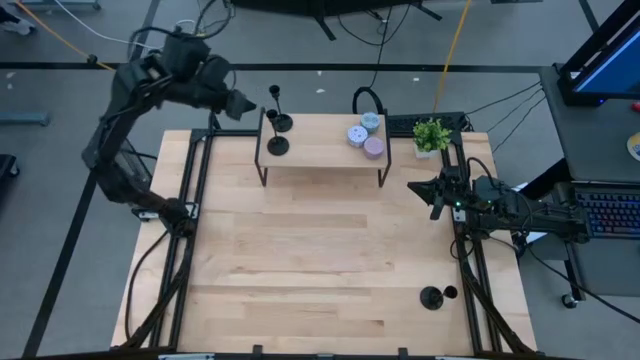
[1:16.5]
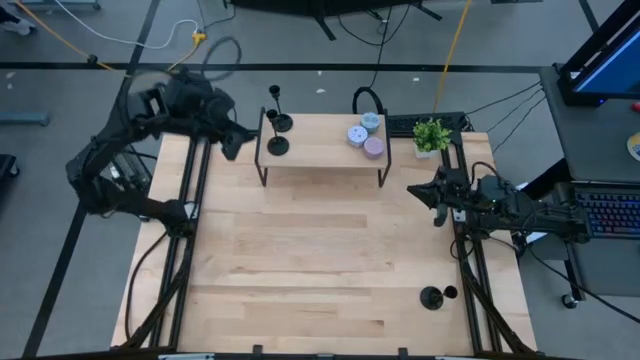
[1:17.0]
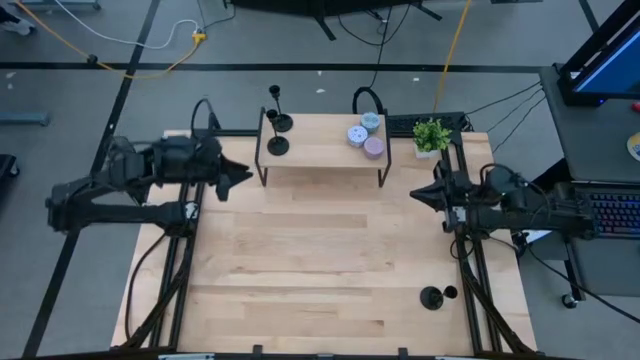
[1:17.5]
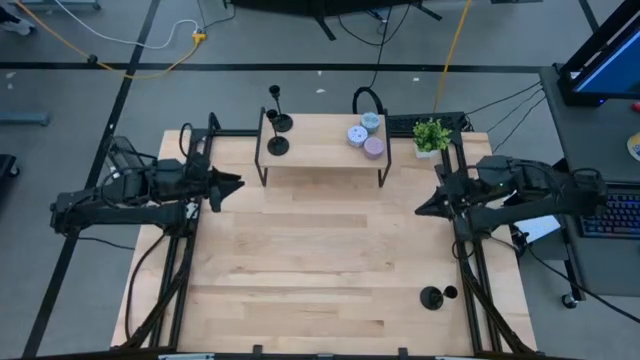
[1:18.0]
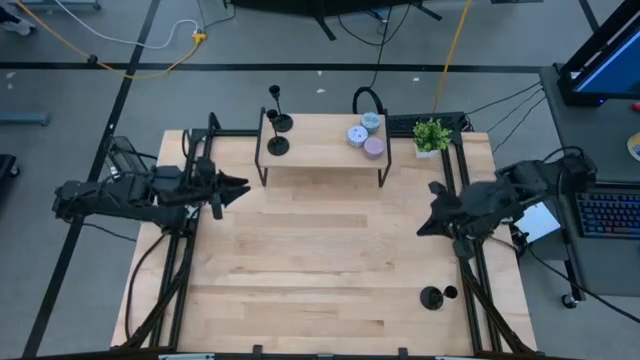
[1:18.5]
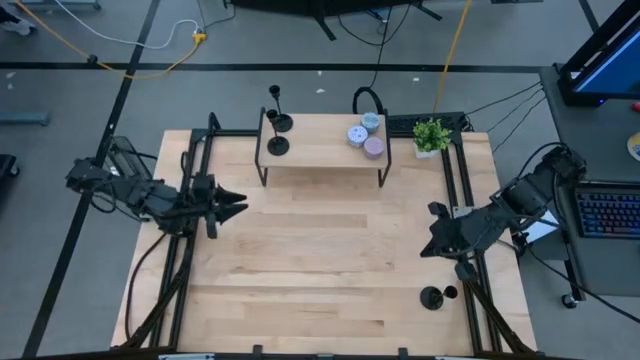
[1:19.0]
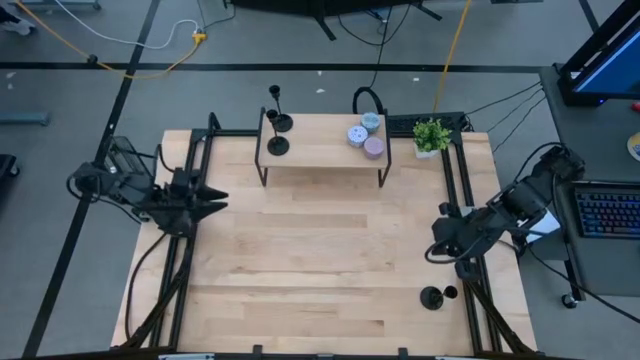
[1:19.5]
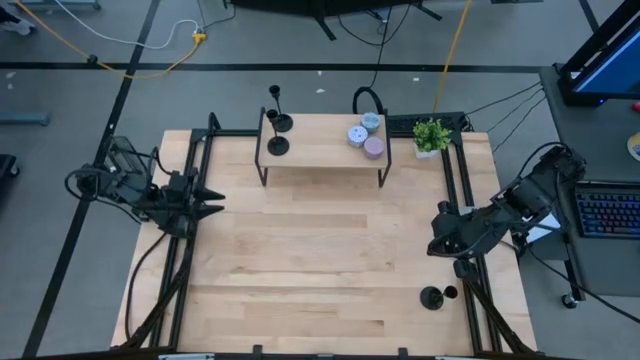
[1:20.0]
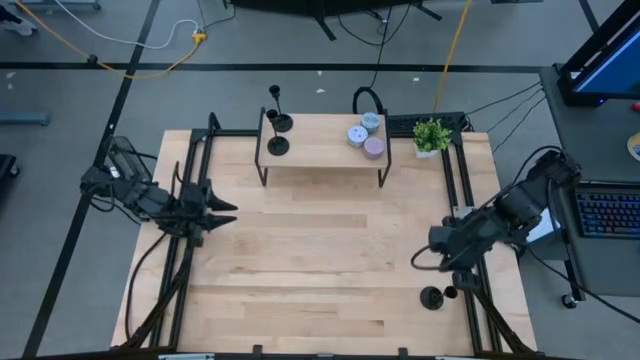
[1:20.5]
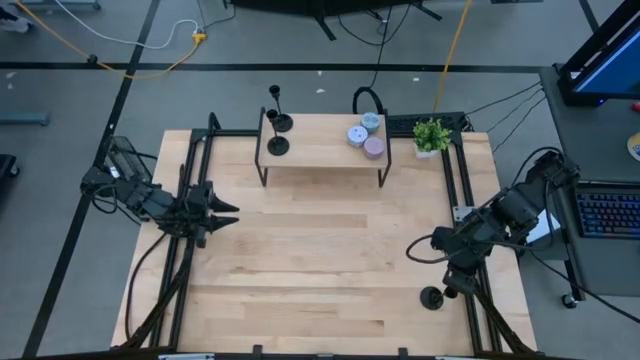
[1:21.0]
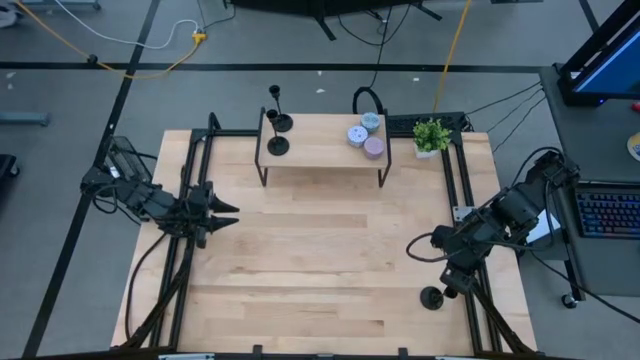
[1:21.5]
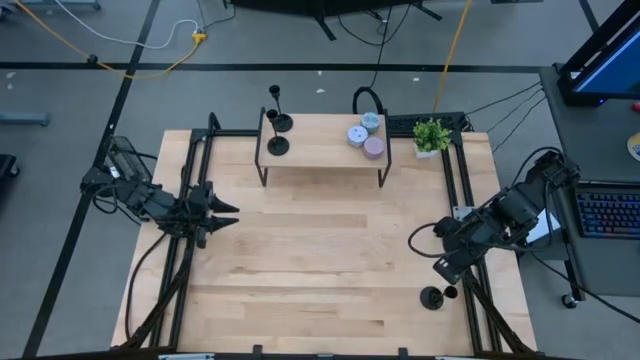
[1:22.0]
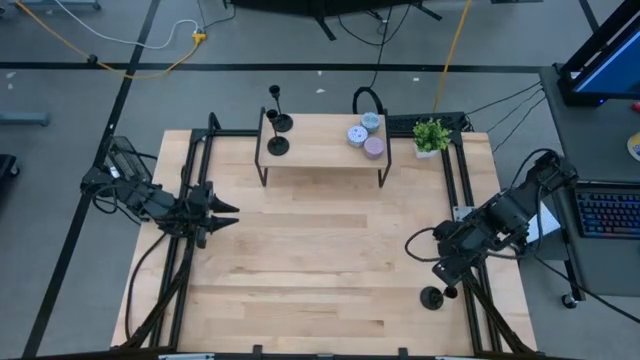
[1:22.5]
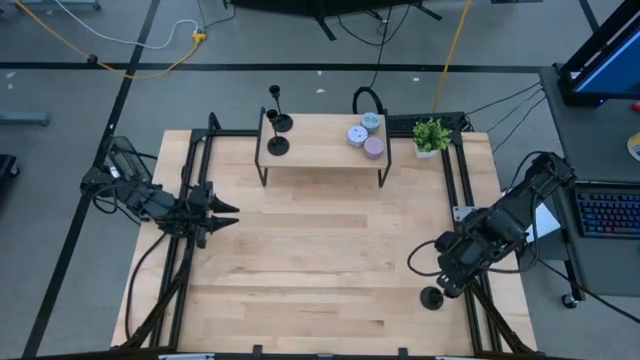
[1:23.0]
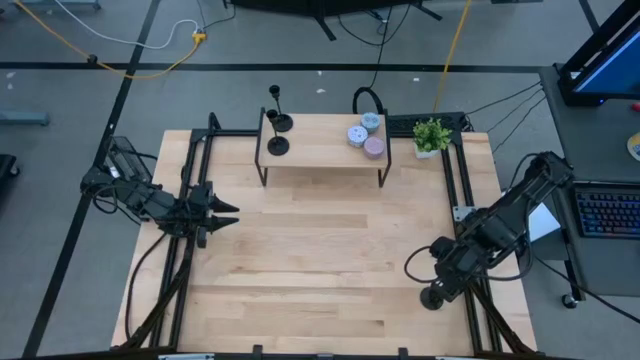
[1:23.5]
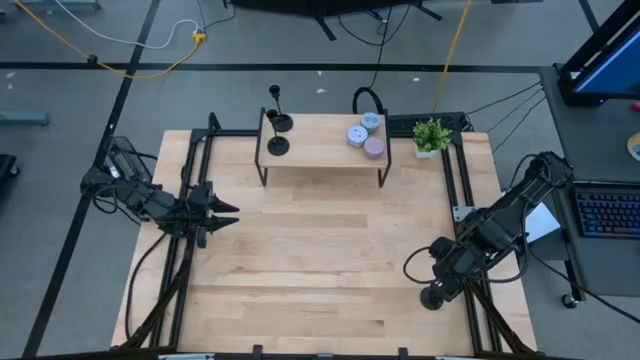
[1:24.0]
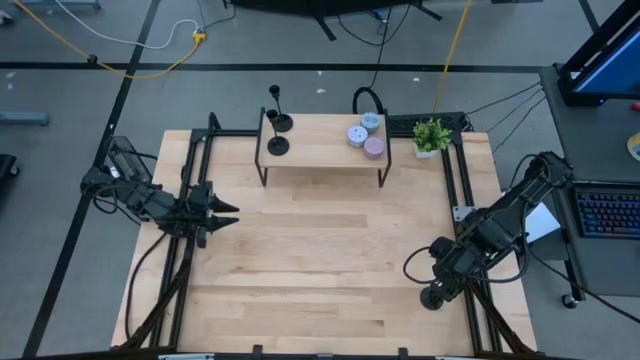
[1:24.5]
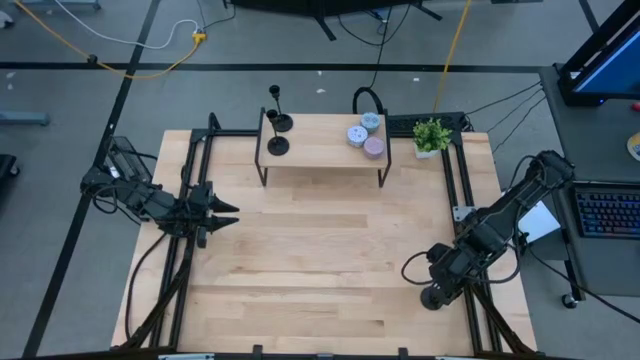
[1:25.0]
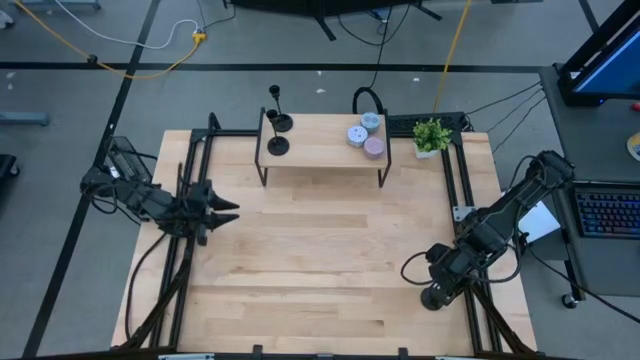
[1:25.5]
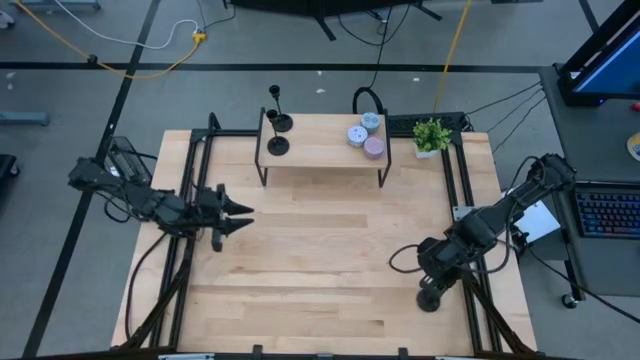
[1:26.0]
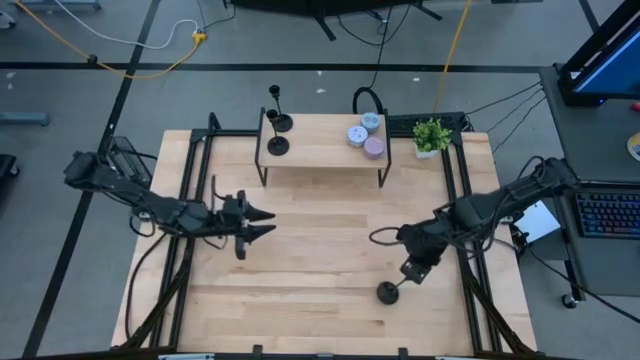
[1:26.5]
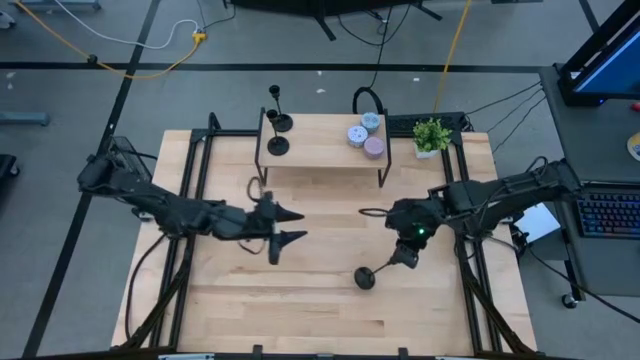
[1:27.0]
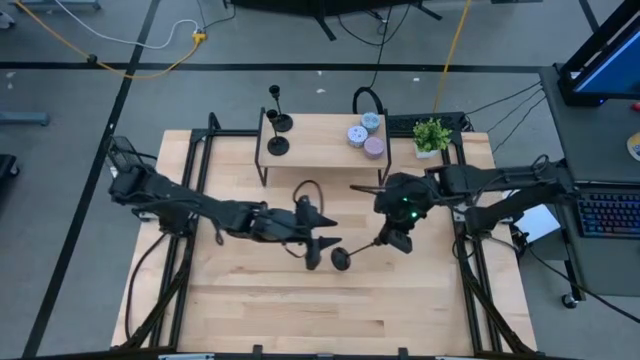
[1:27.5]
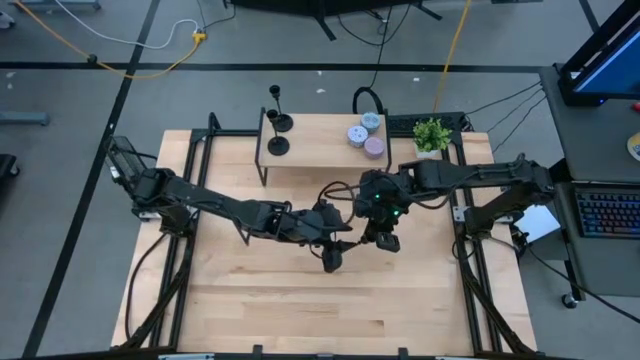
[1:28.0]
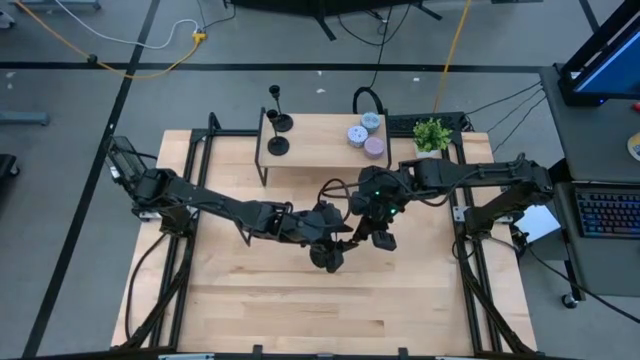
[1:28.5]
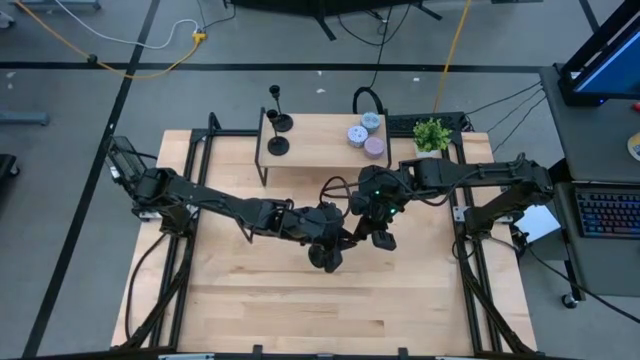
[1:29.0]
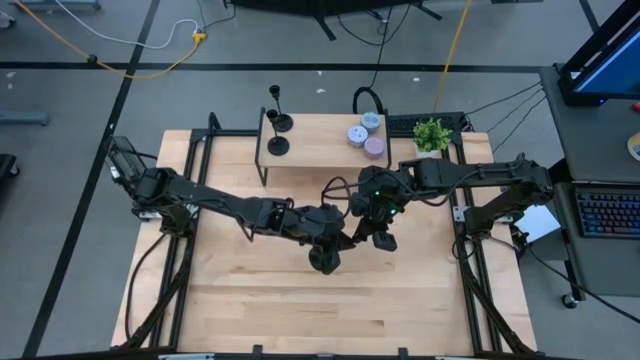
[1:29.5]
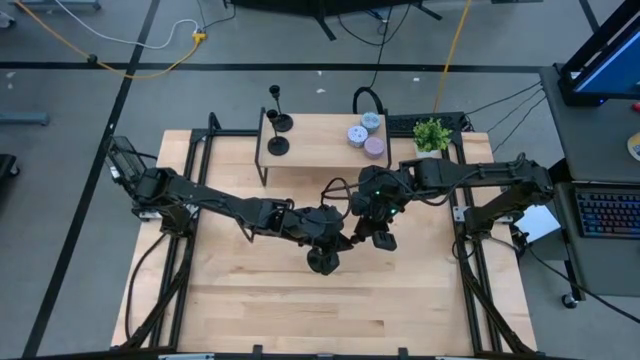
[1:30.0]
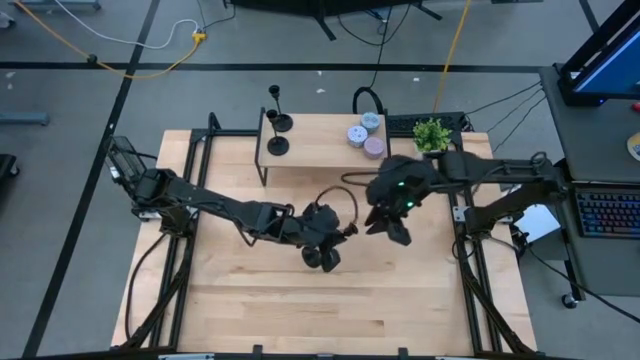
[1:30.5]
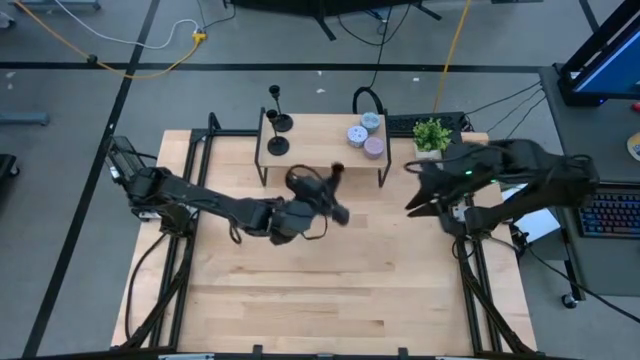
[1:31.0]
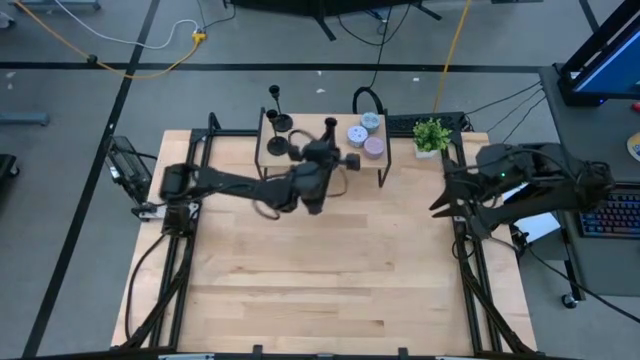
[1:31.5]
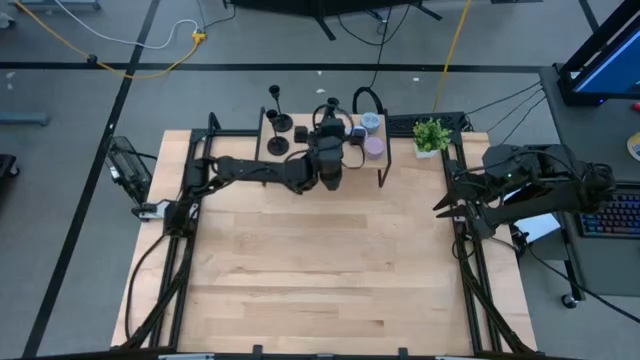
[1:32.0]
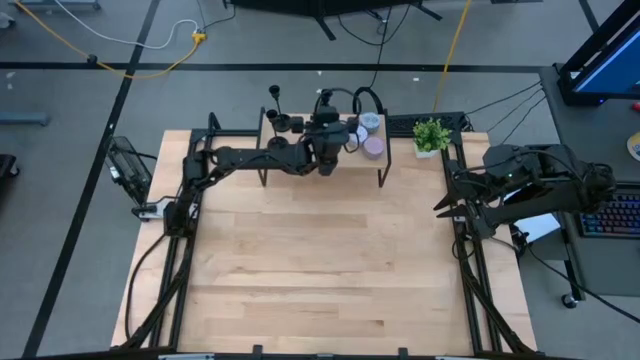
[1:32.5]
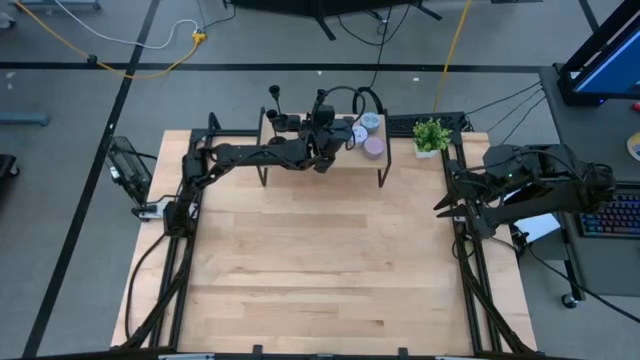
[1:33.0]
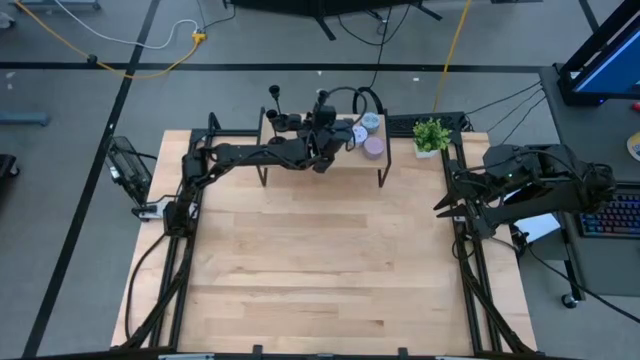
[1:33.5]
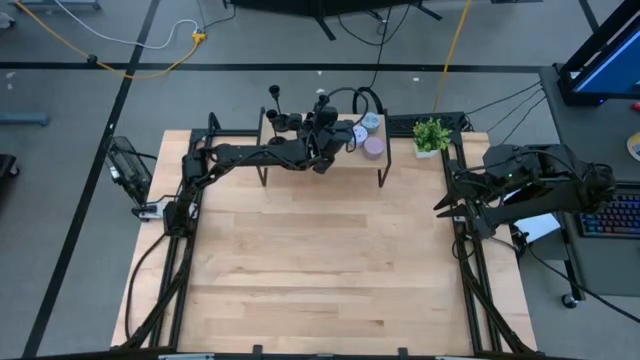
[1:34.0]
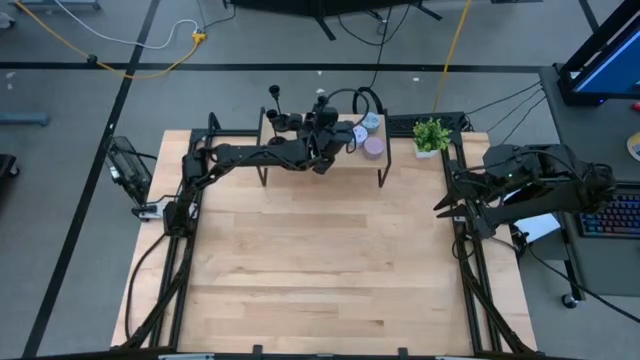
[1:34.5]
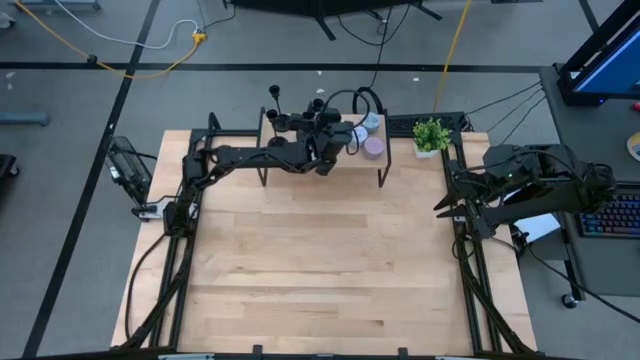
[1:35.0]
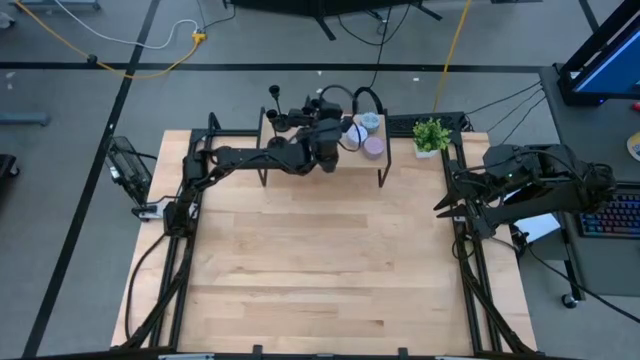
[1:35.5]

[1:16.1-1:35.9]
Task: Pick & Place candle stick holders
Put the black candle holder on the shelf
